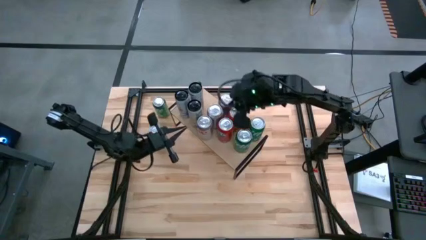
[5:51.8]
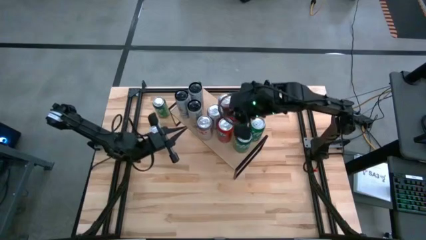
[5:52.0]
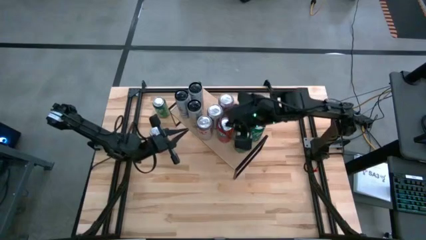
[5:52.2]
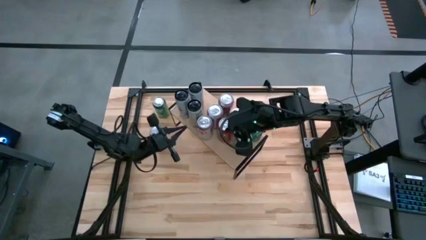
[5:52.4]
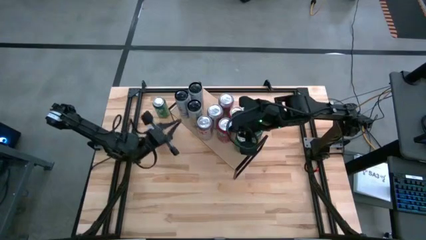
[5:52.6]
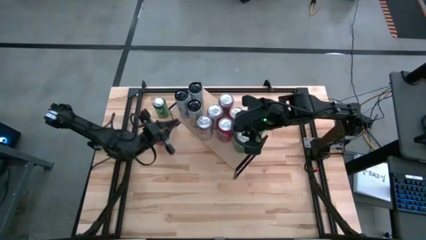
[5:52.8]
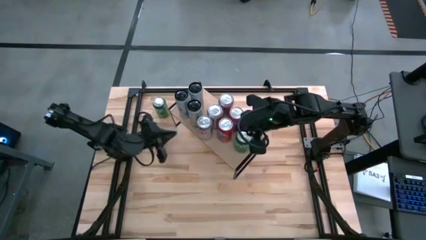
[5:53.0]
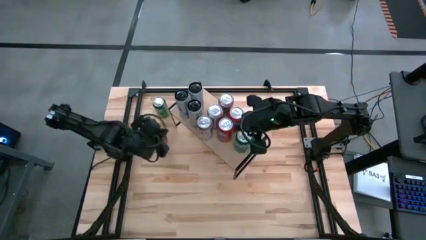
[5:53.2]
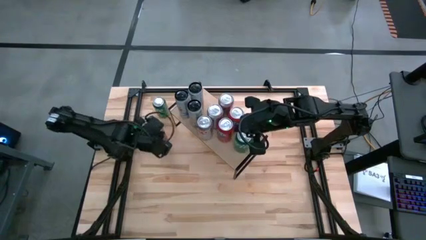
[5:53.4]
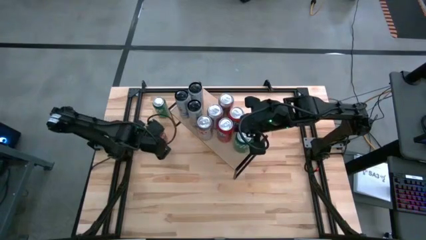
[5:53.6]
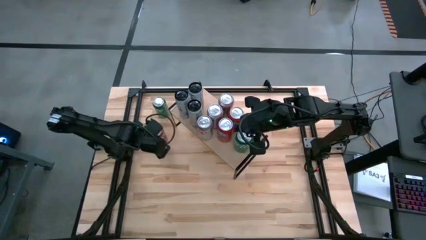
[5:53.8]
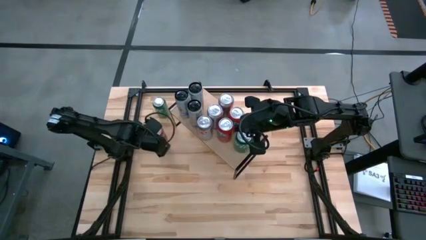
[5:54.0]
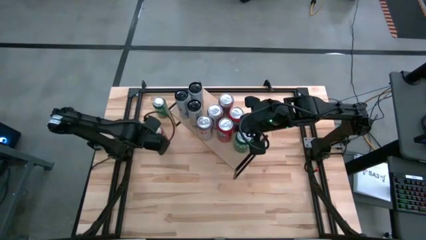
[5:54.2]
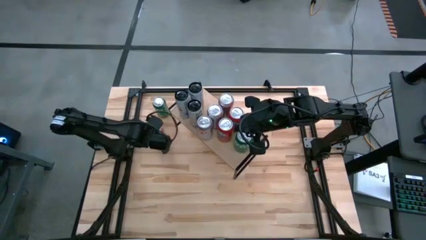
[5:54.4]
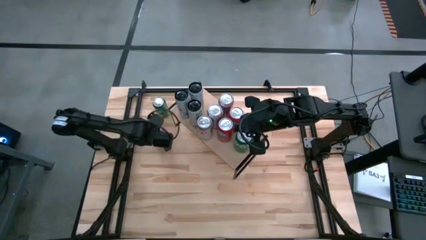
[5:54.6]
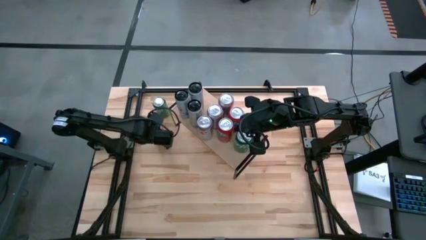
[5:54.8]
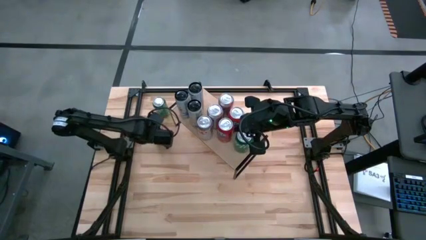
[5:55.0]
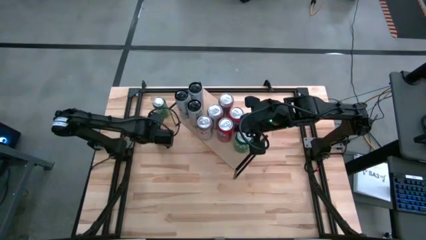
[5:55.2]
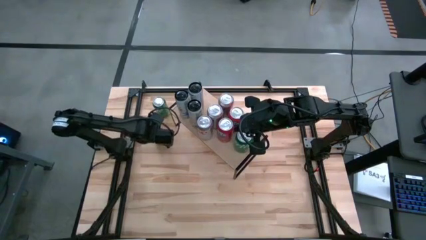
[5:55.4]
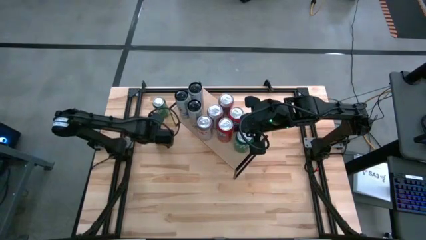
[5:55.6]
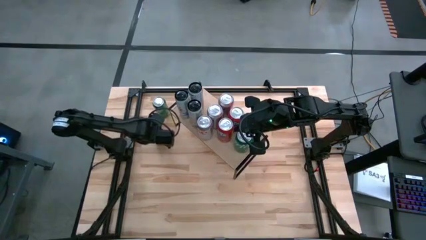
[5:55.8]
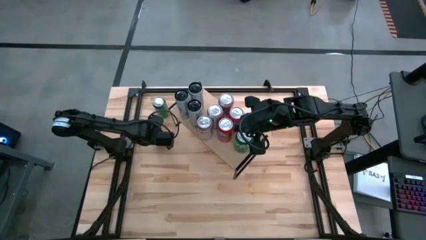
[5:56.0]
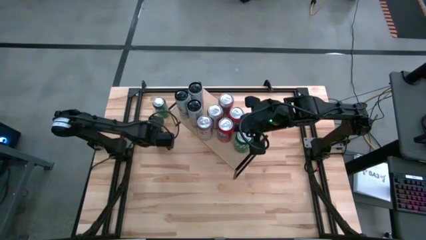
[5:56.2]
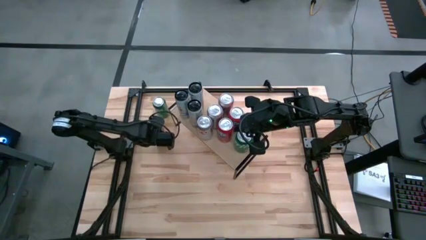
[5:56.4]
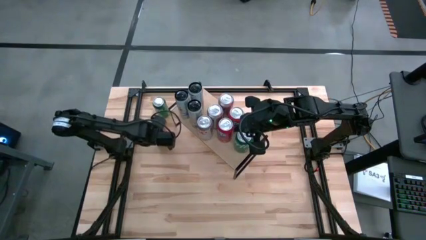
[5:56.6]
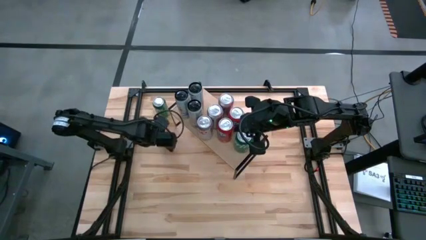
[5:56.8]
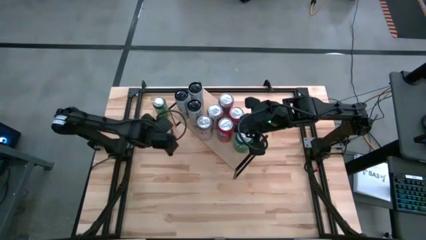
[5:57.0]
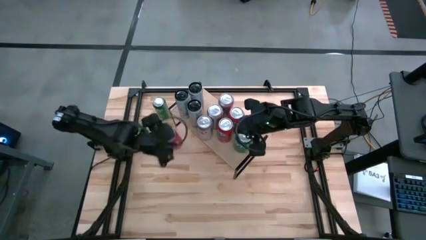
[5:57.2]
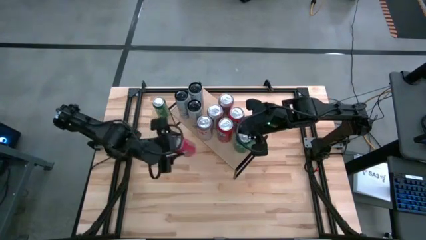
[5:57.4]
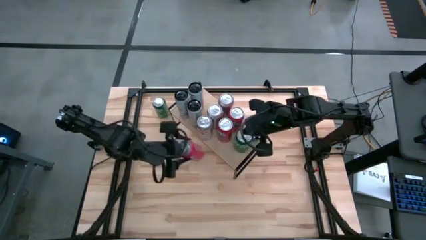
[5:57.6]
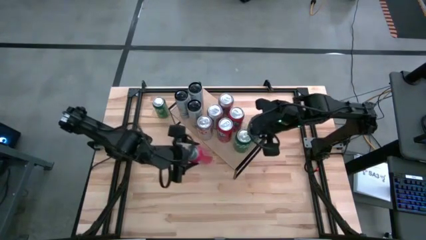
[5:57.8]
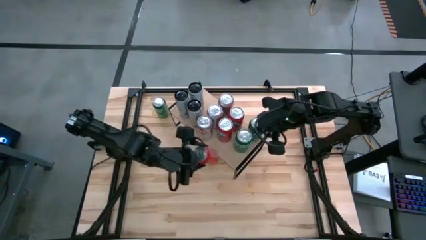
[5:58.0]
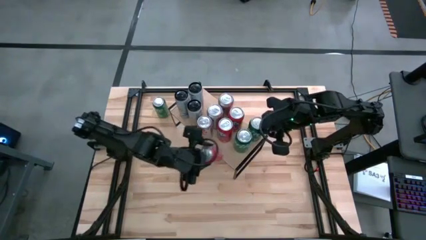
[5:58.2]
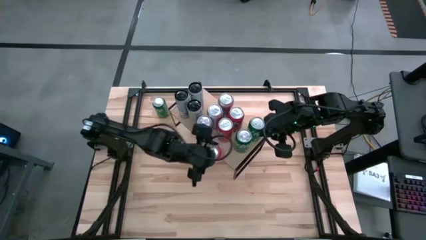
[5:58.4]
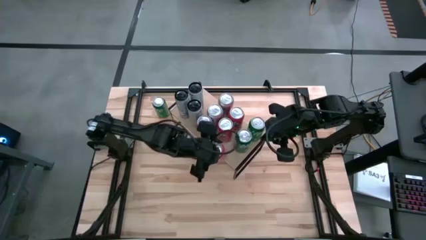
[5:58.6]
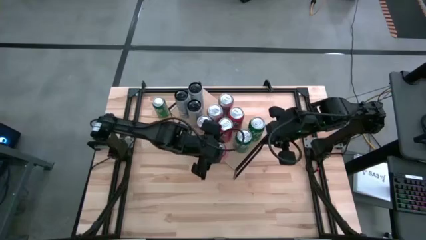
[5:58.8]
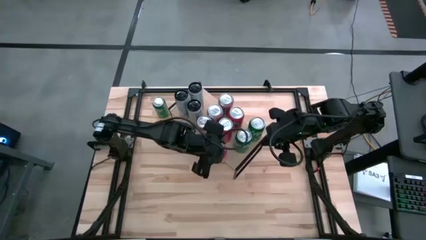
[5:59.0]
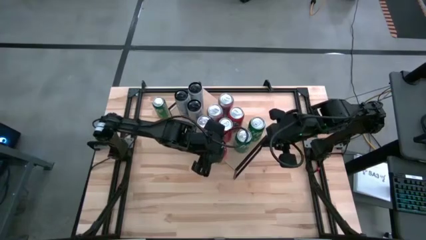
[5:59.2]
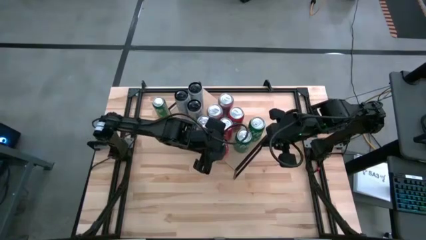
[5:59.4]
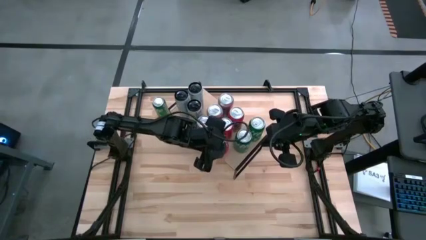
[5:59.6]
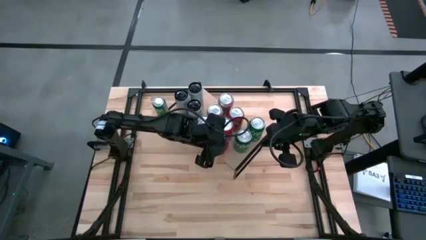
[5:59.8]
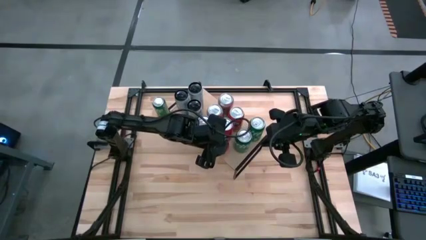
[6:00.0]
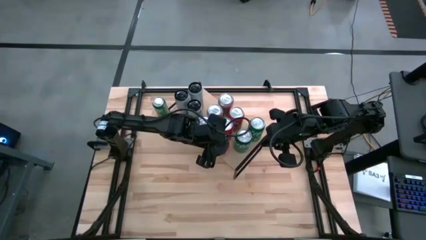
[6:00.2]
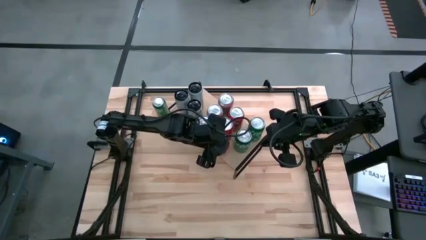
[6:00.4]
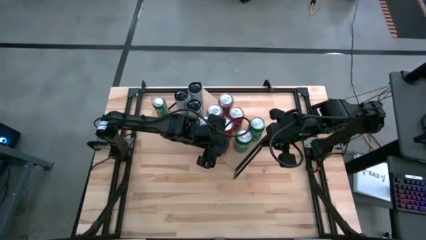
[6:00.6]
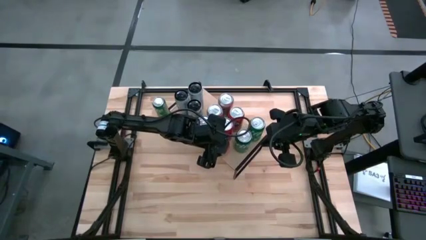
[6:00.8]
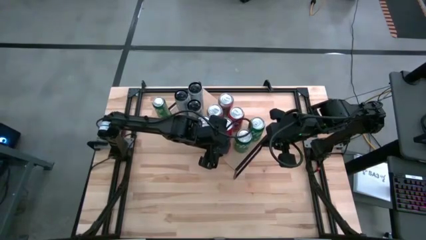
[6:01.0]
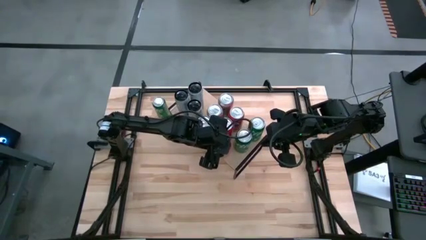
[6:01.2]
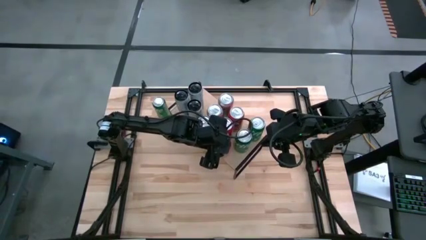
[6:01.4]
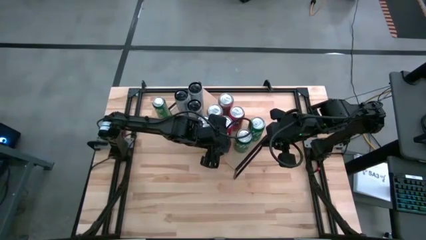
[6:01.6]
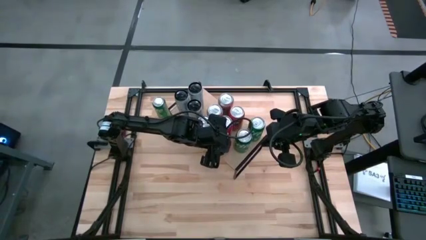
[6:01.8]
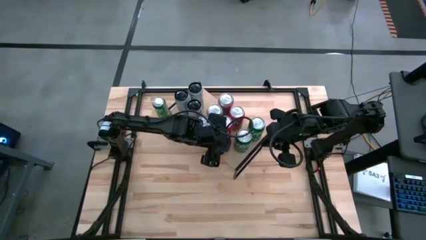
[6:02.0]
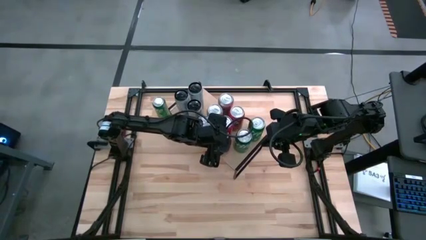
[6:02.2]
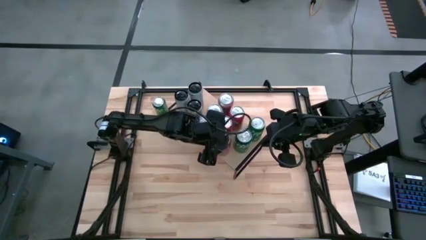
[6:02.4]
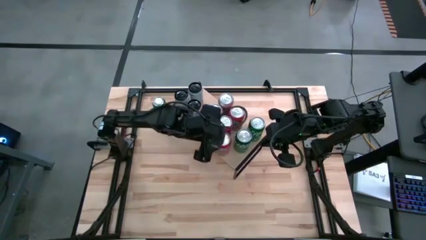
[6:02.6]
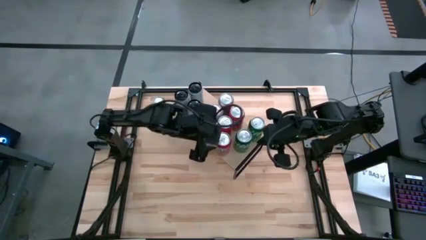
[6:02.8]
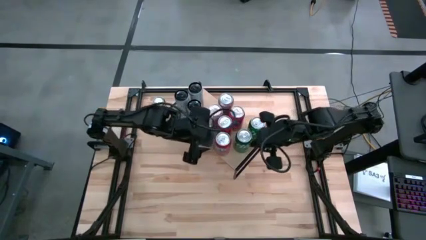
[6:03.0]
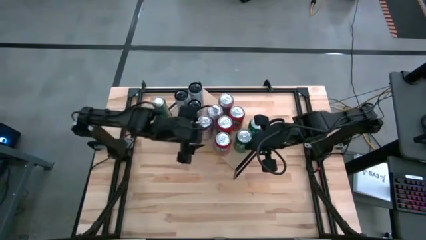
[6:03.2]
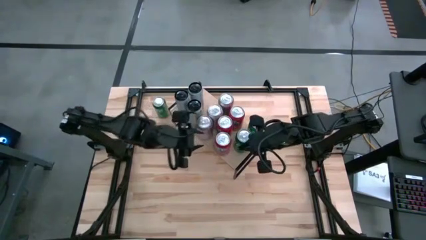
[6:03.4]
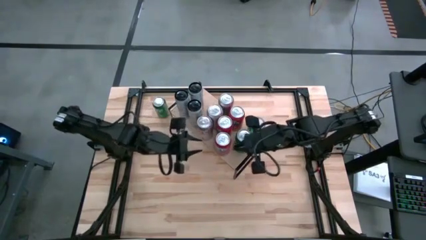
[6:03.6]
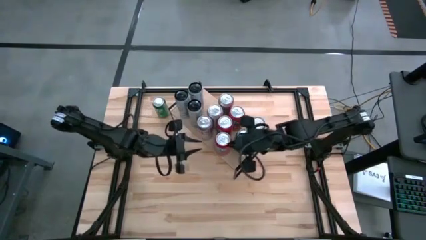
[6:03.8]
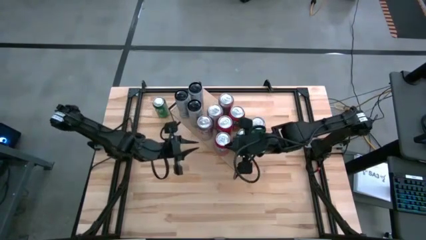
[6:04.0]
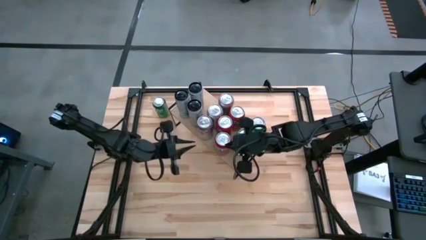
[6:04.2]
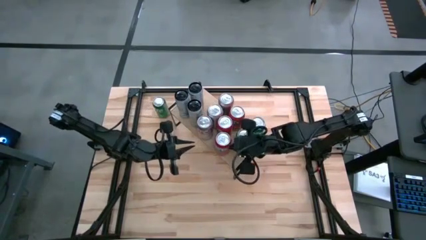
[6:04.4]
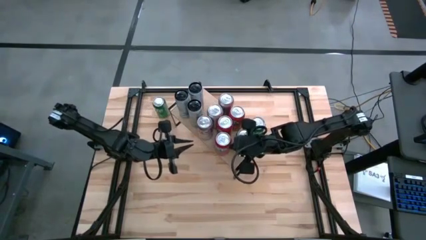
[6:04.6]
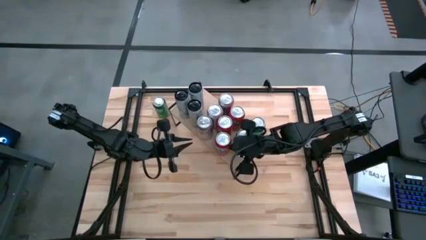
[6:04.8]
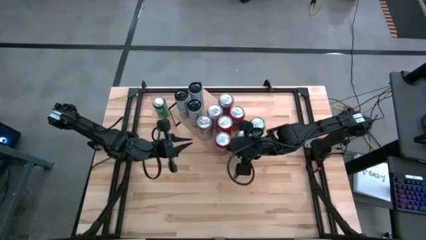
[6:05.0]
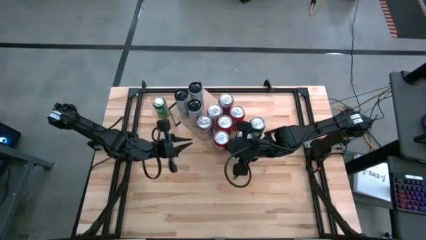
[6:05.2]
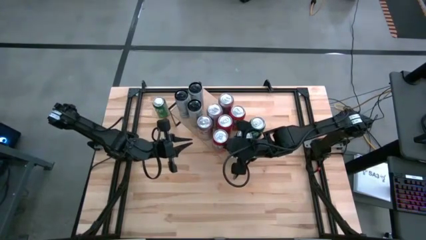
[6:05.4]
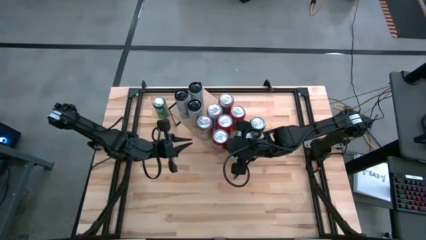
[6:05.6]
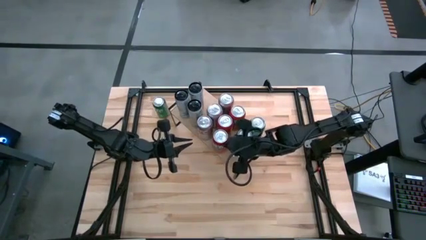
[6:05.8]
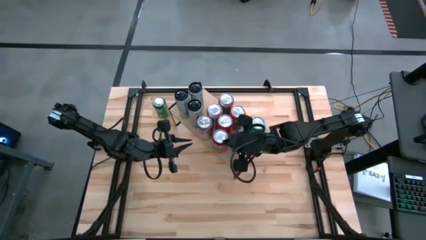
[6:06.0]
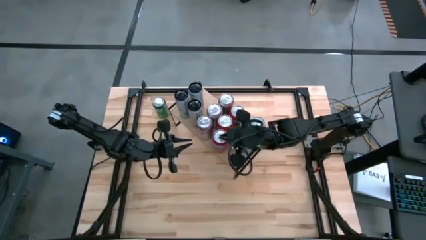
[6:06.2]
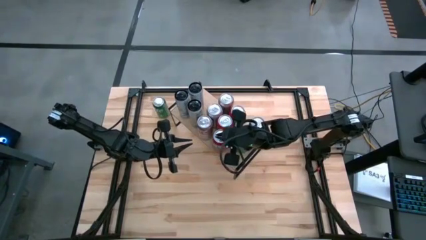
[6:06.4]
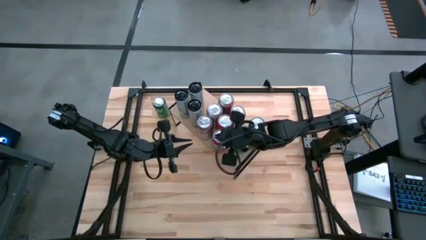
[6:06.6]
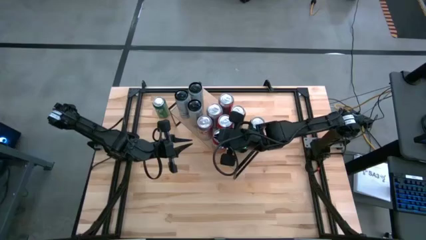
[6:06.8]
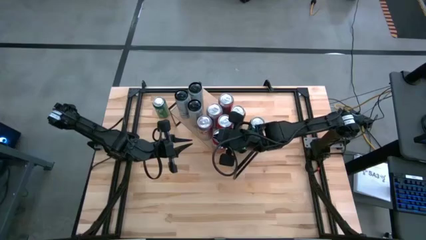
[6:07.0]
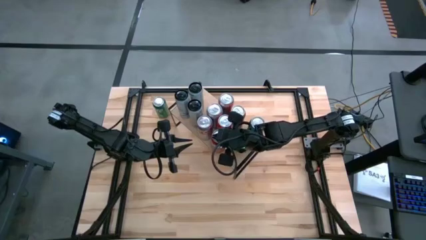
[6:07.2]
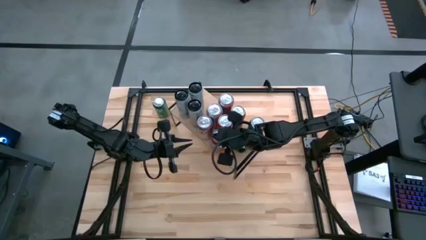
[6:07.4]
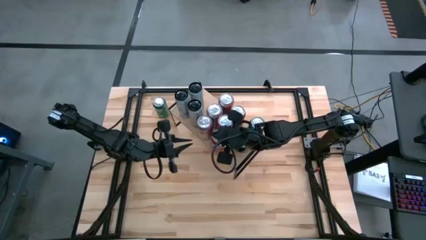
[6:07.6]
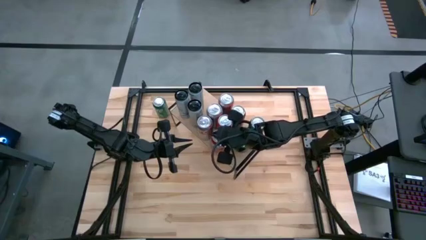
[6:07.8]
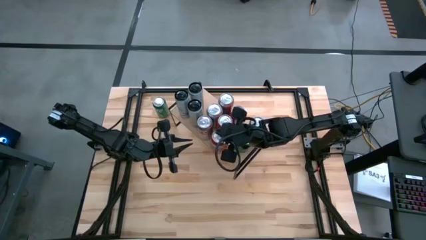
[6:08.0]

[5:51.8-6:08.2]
Task: Place canned beverage on shelf
Put the orange soda can on the shelf aligned with the other orange soda can

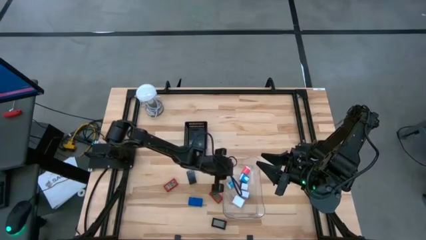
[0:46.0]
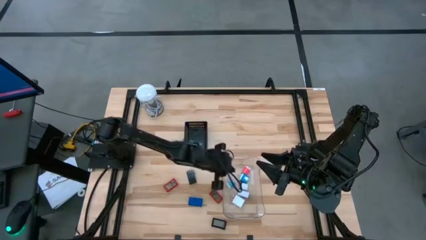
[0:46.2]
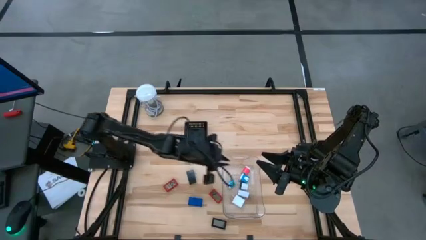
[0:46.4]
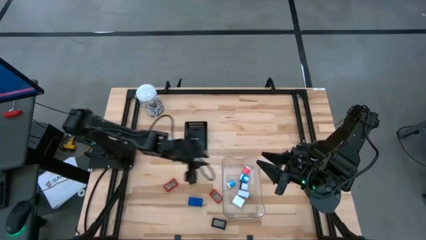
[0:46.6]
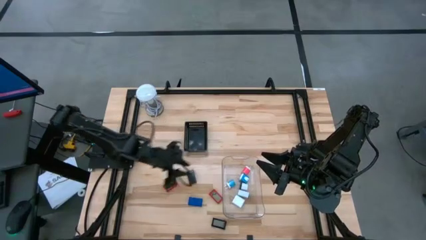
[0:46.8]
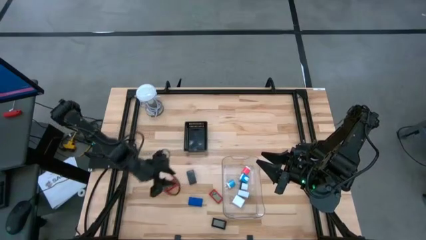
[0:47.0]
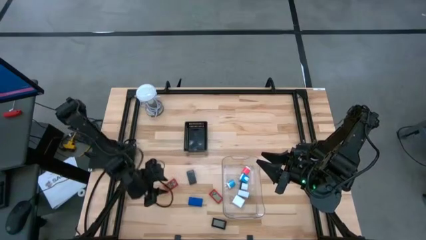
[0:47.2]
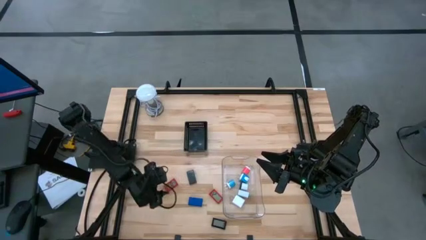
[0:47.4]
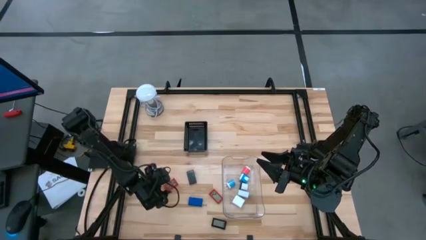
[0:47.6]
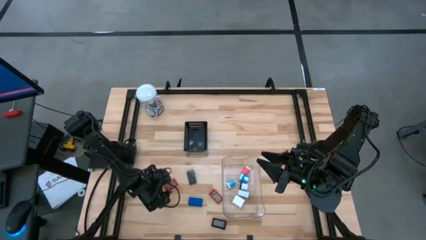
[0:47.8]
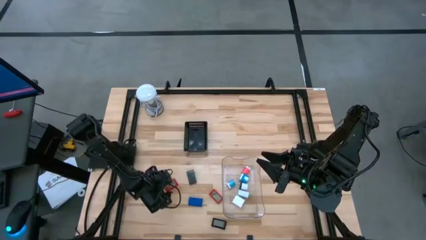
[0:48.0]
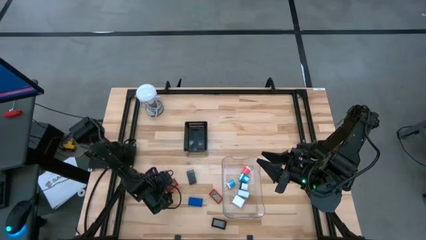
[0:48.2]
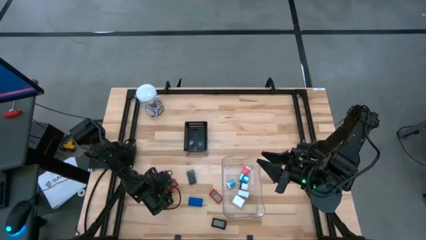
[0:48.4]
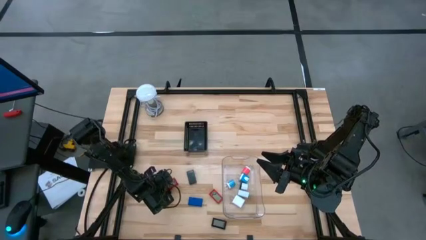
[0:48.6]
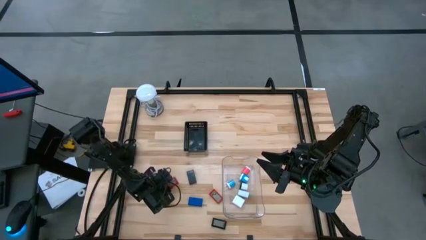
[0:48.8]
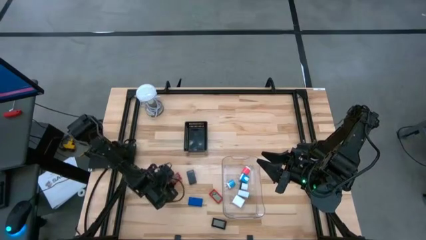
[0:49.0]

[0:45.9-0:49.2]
Task: Pick & Place Office items
Put the top red digital clock into the black bin
